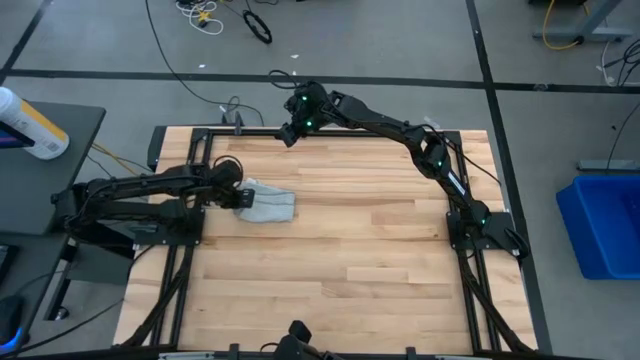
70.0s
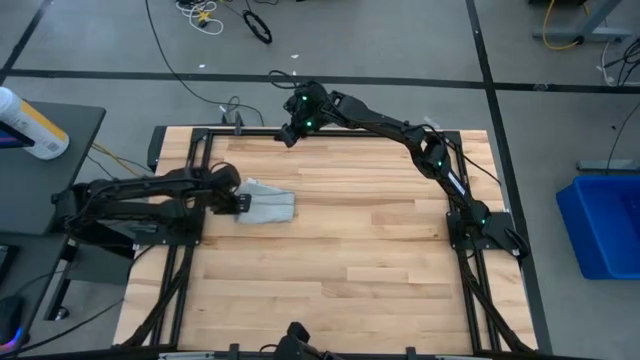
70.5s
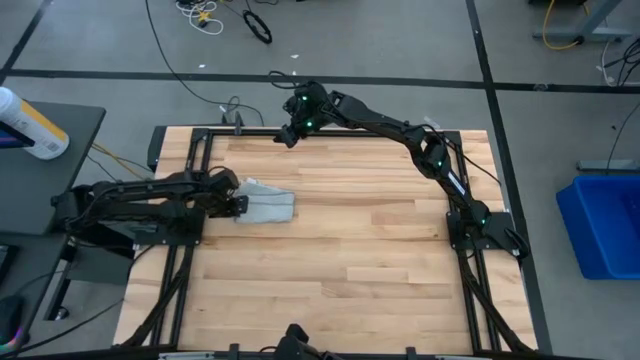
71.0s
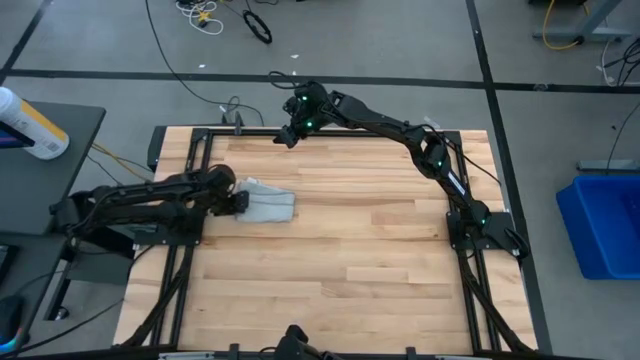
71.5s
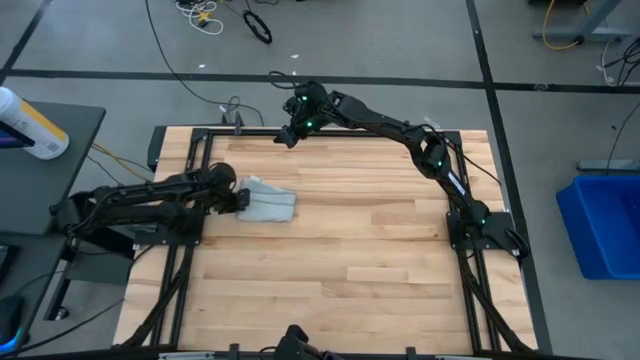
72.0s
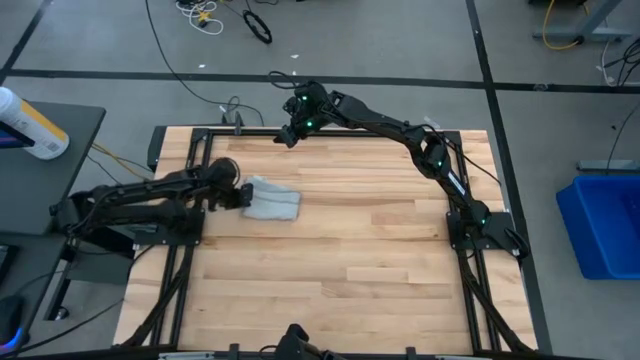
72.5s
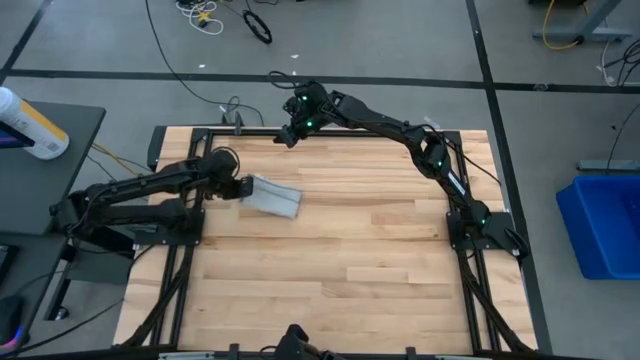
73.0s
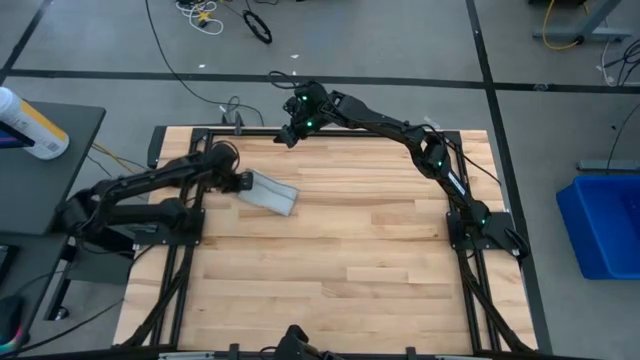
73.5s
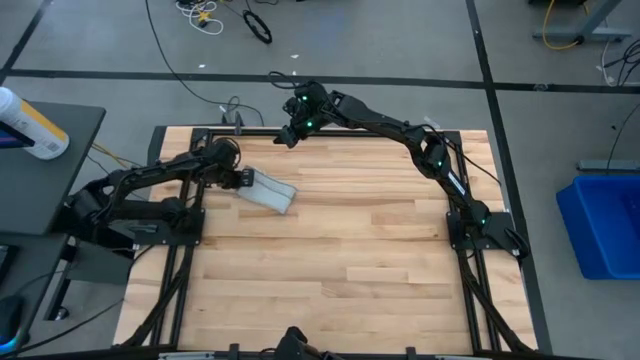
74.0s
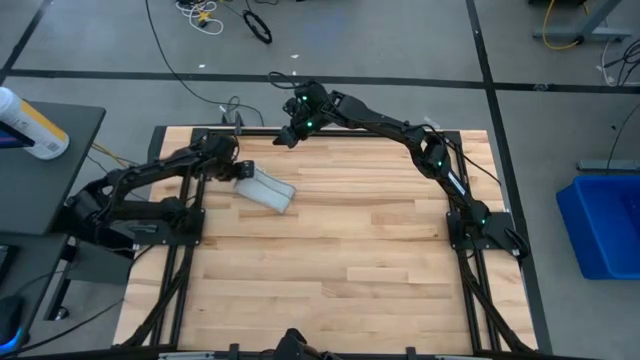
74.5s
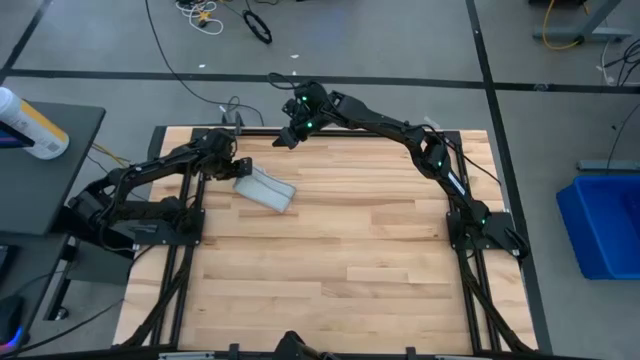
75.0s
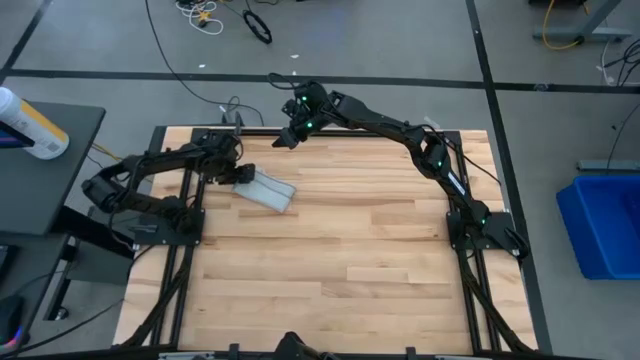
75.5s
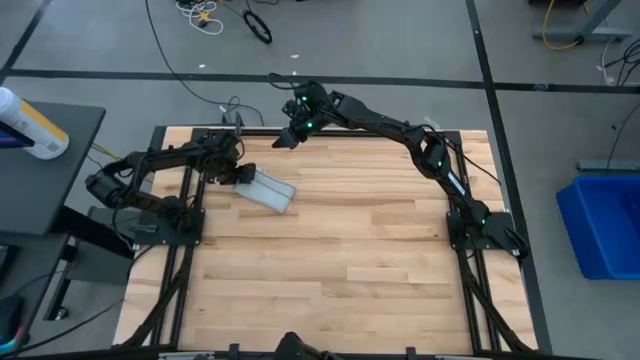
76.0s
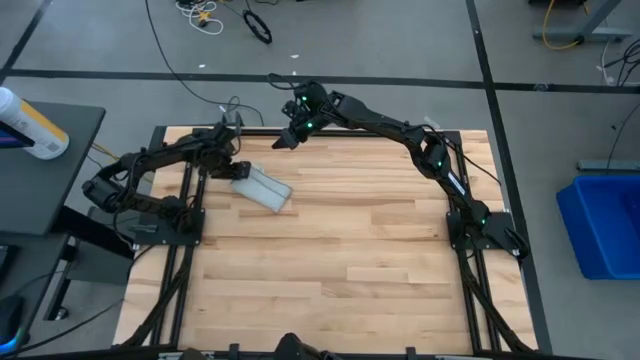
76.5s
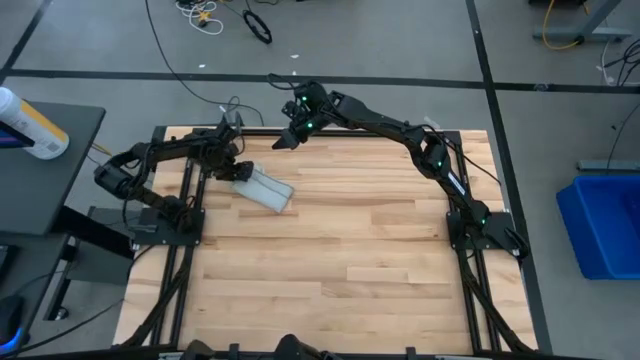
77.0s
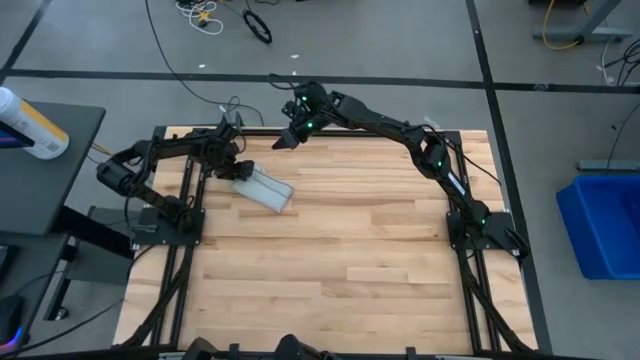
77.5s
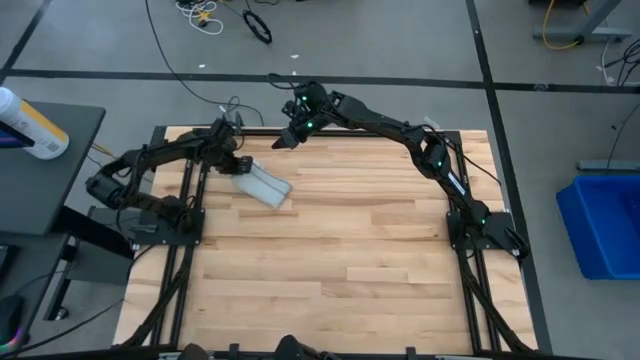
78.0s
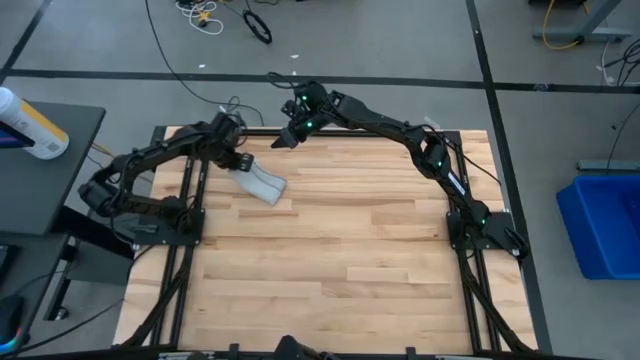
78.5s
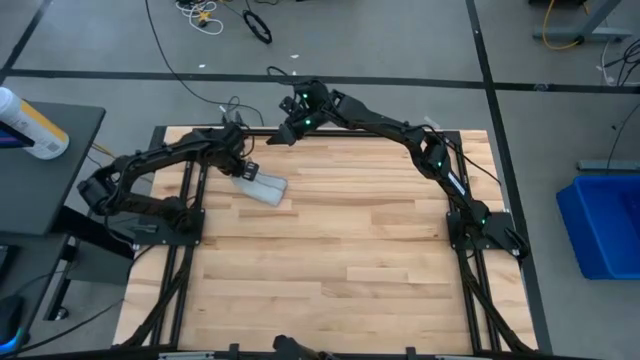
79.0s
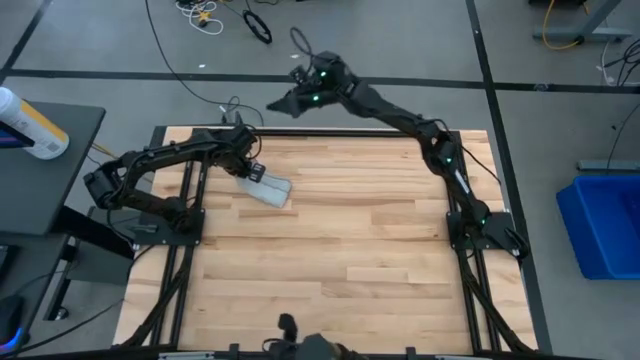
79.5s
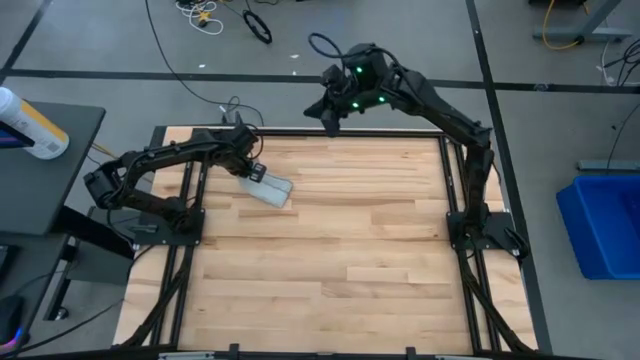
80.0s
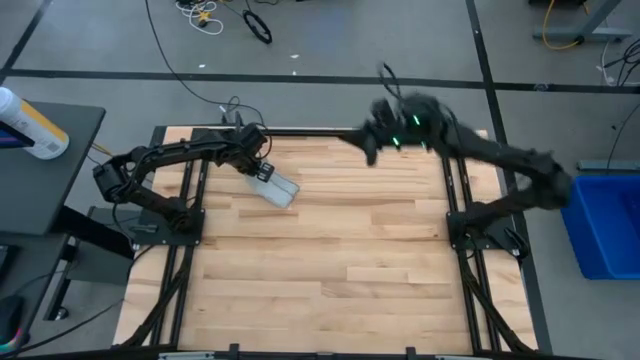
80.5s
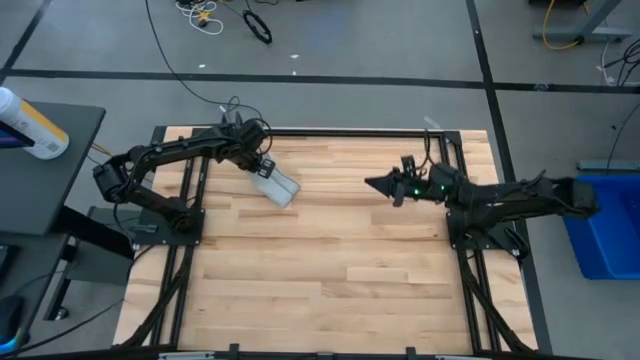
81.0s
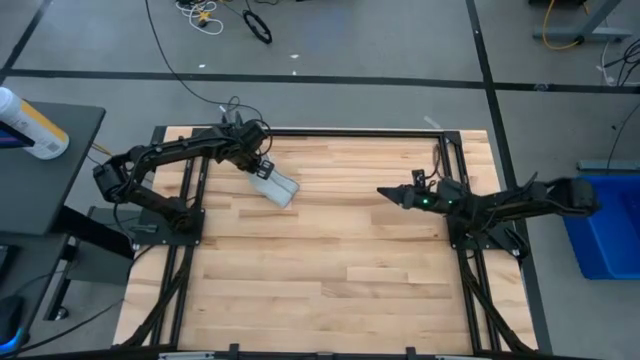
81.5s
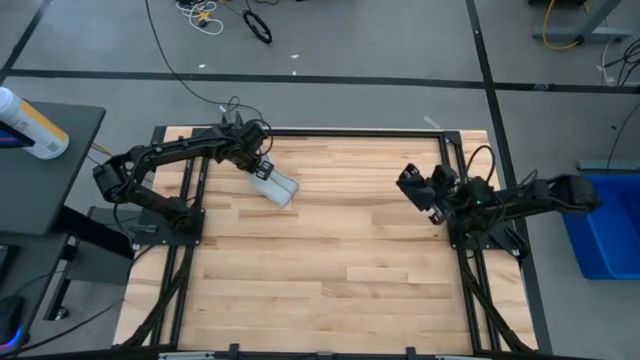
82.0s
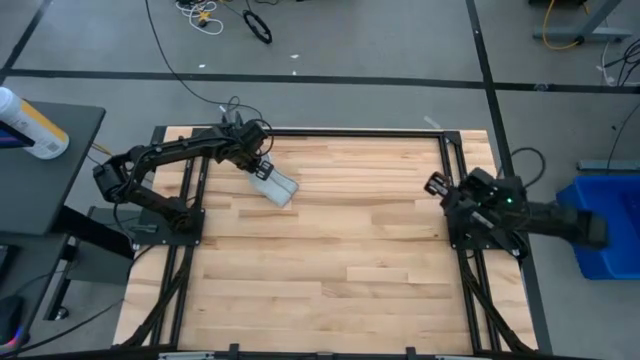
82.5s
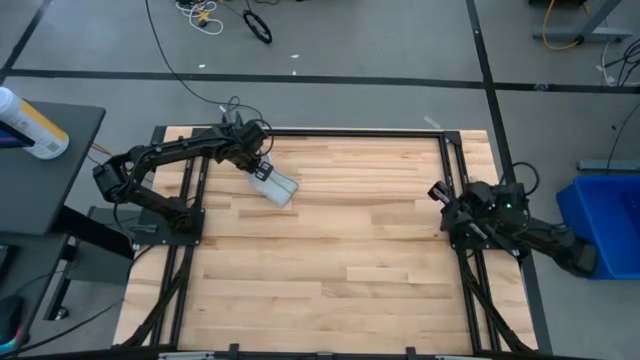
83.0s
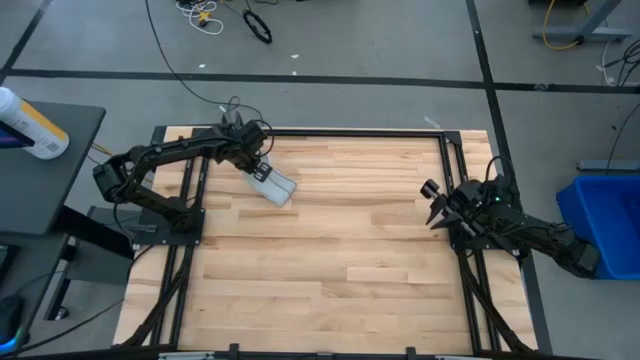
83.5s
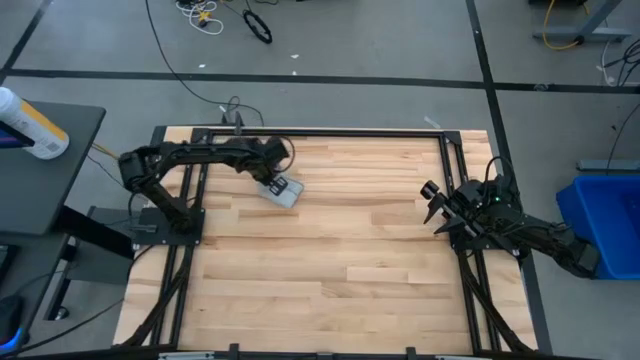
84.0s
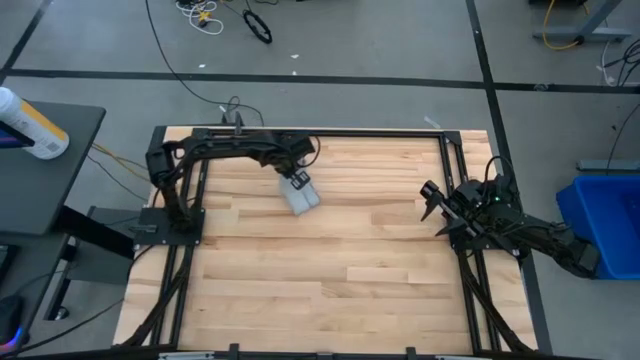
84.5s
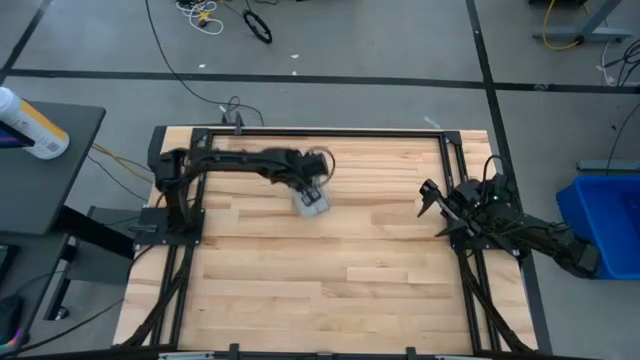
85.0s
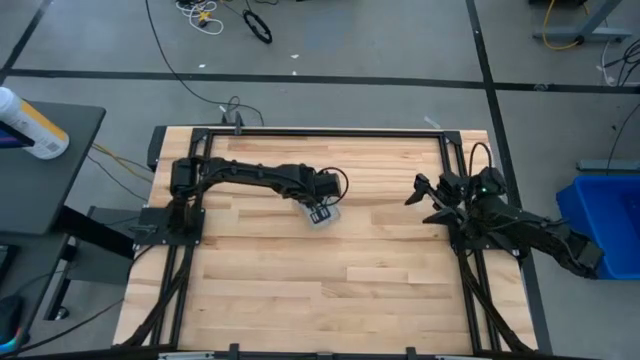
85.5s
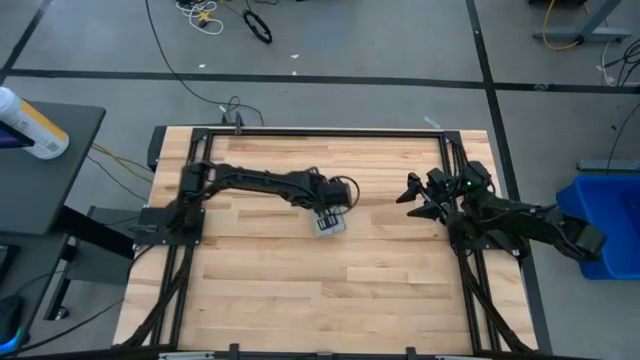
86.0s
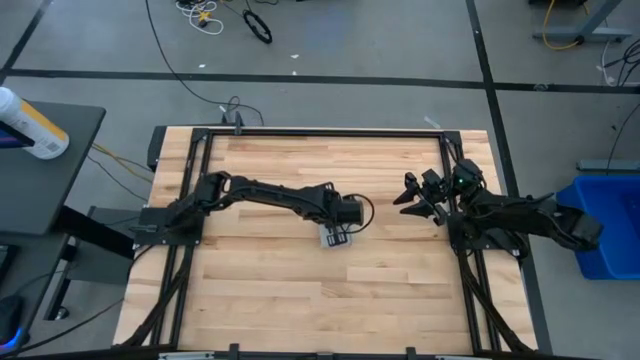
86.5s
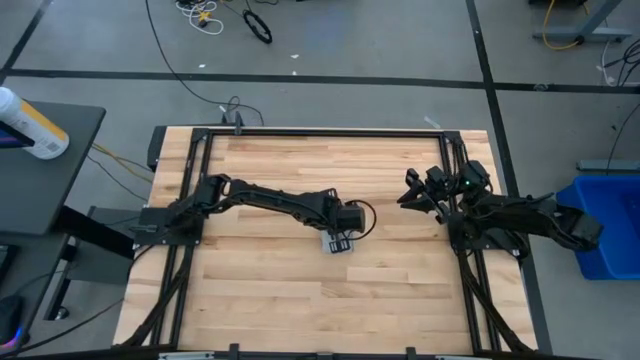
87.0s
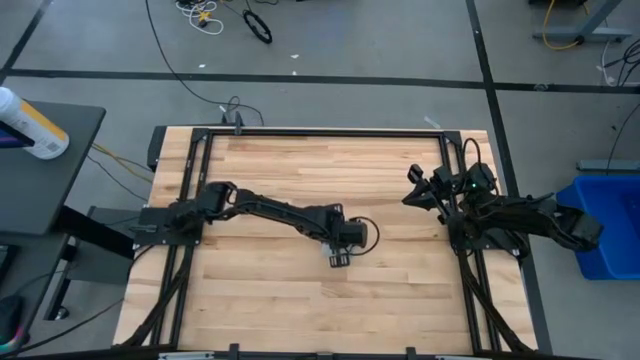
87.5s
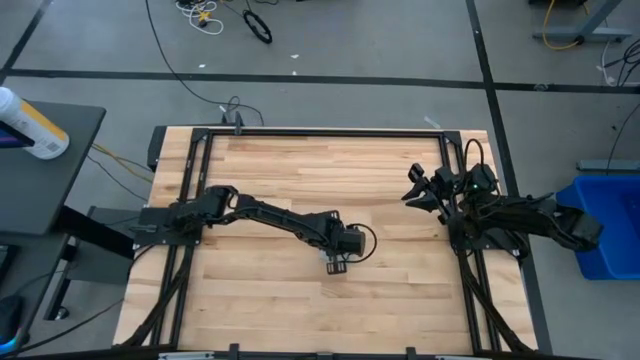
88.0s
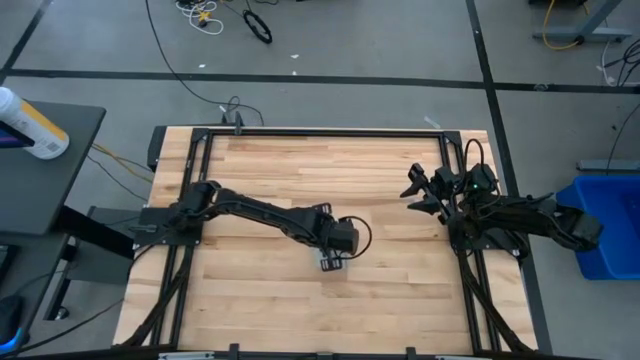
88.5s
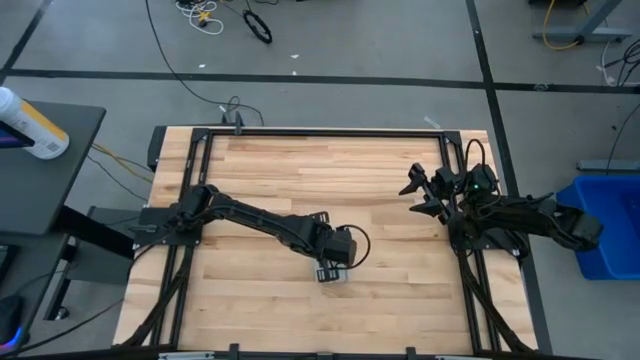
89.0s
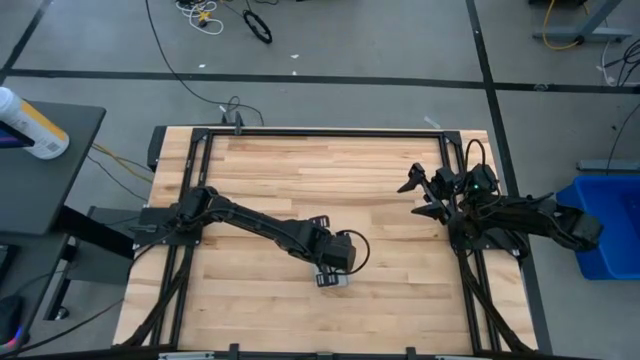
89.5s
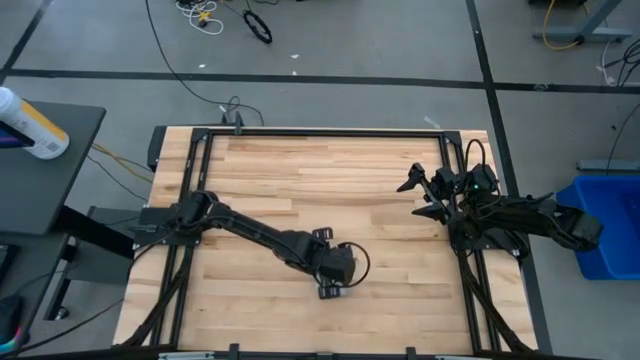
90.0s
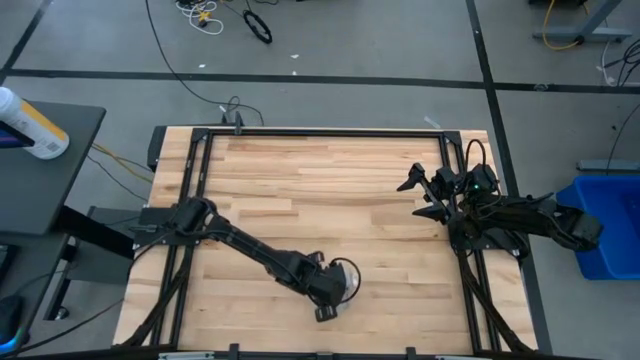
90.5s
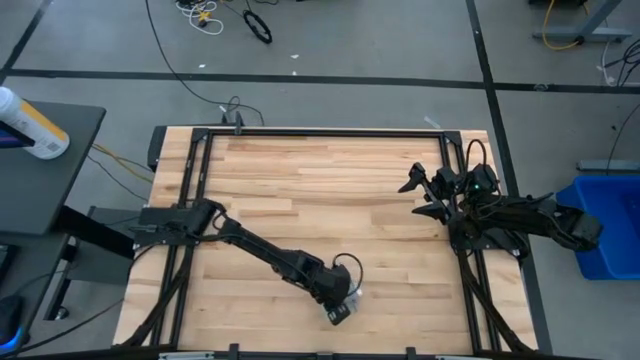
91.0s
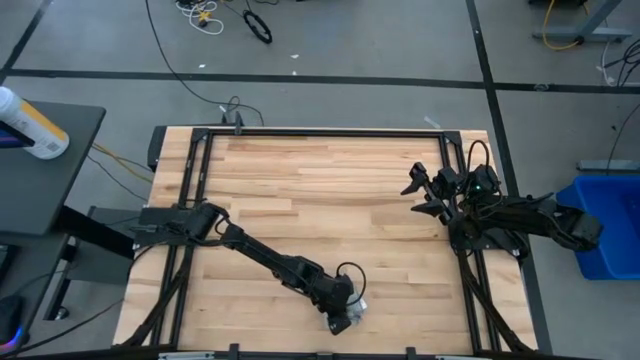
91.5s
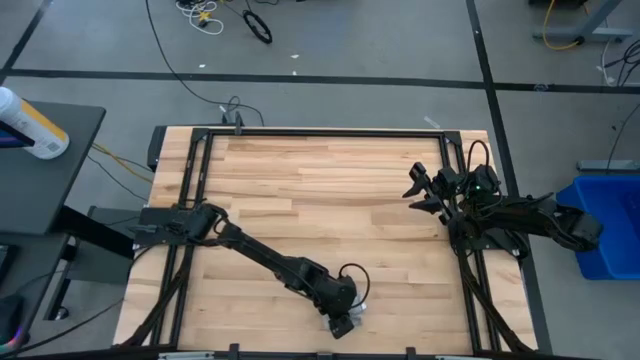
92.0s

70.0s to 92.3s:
Task: Fold microfiber towels
Fold the gray microfiber towel
